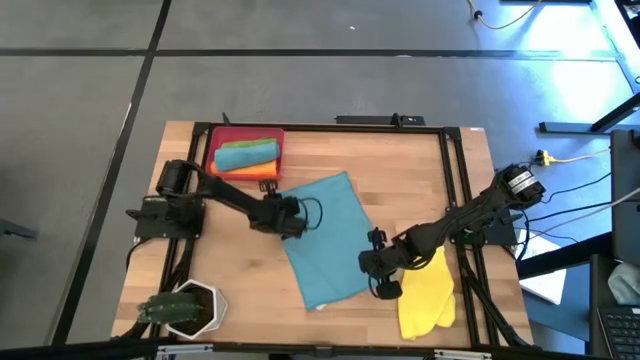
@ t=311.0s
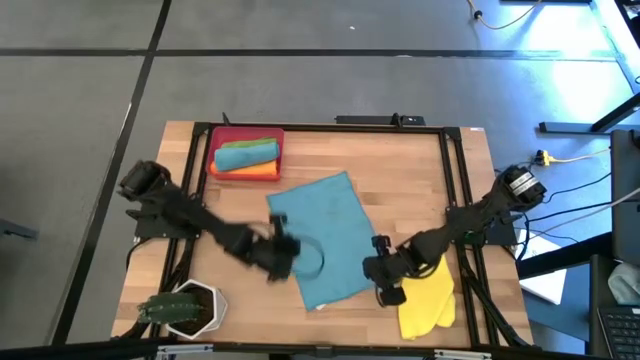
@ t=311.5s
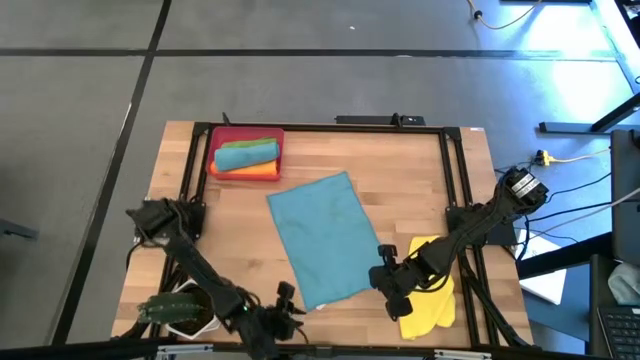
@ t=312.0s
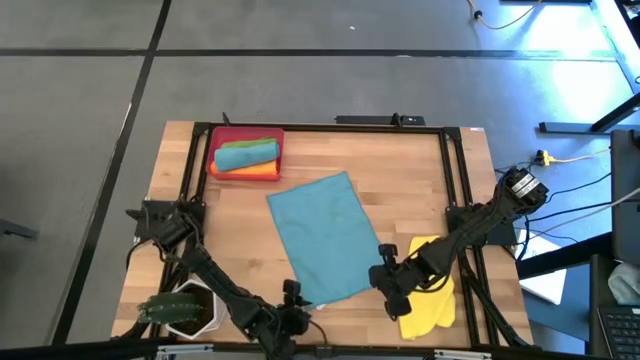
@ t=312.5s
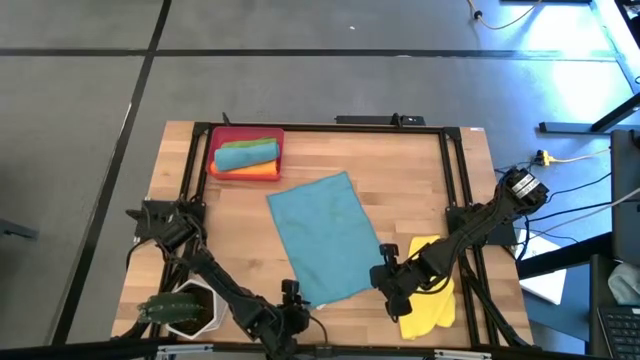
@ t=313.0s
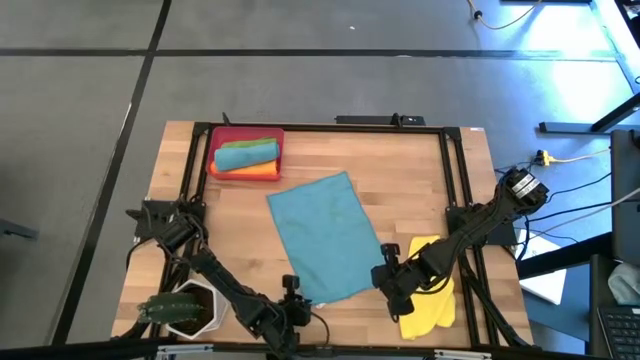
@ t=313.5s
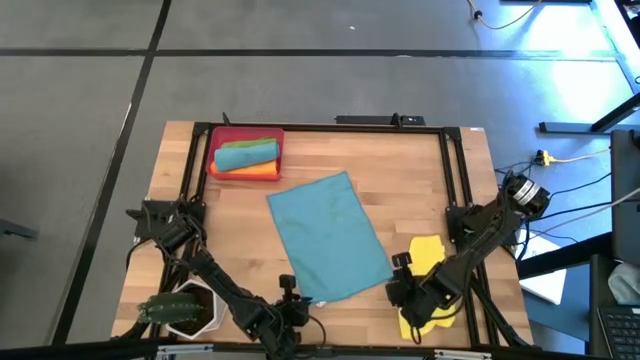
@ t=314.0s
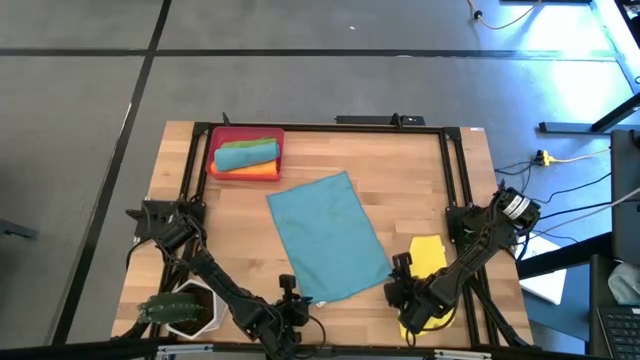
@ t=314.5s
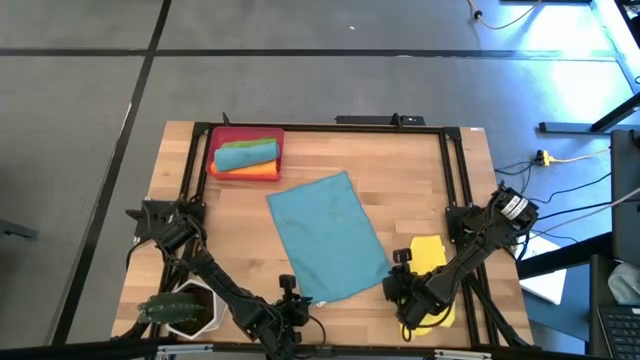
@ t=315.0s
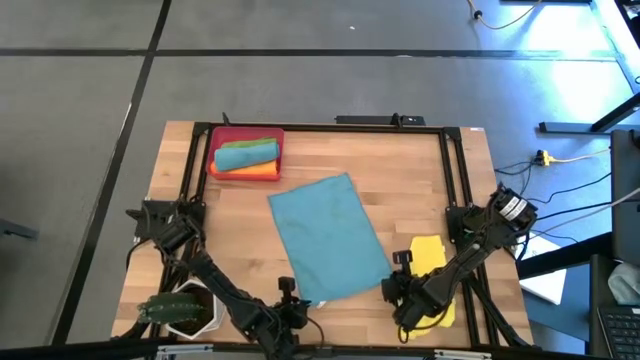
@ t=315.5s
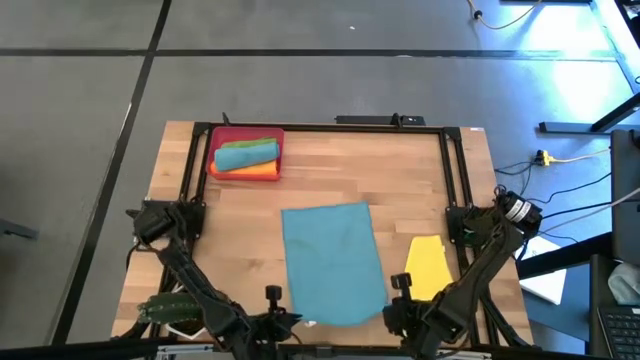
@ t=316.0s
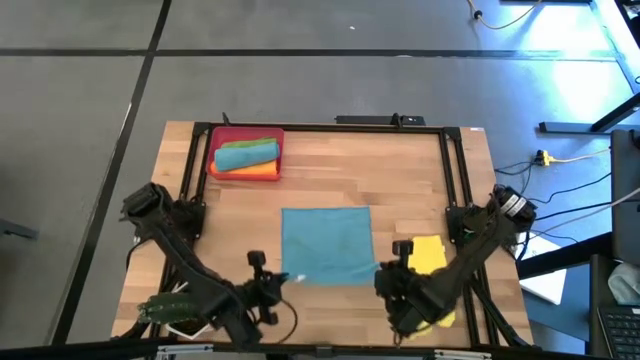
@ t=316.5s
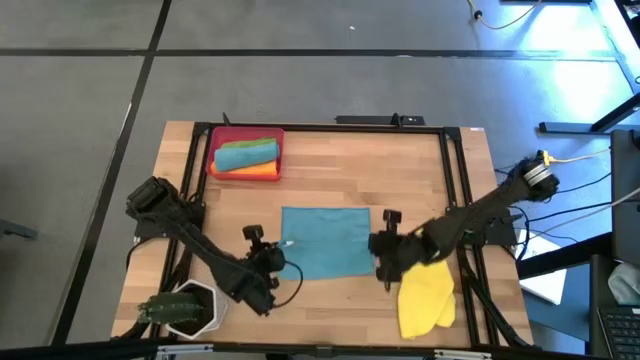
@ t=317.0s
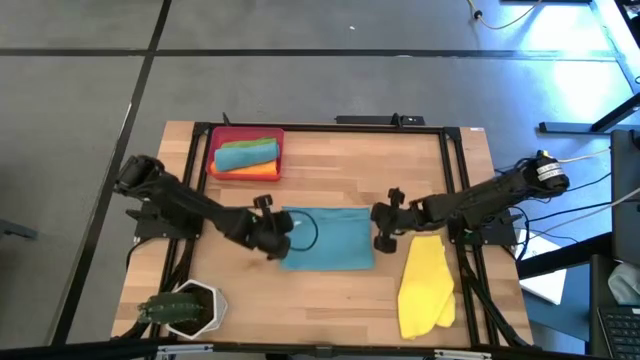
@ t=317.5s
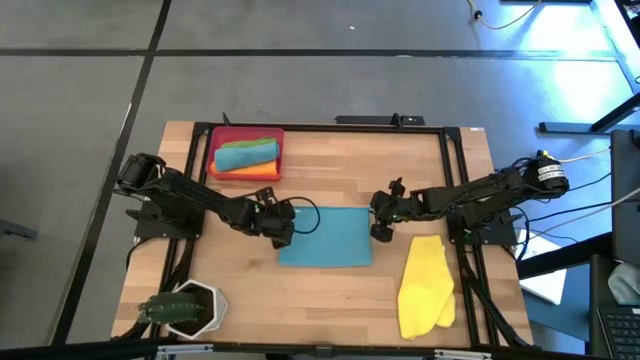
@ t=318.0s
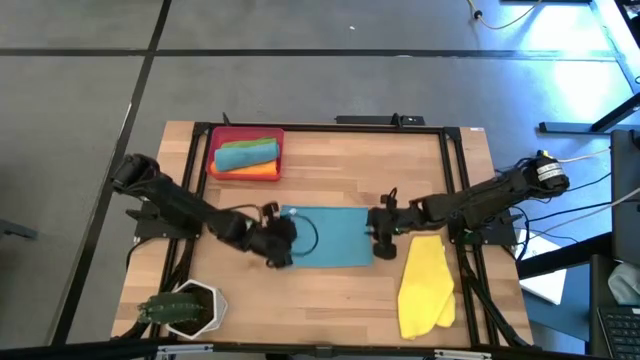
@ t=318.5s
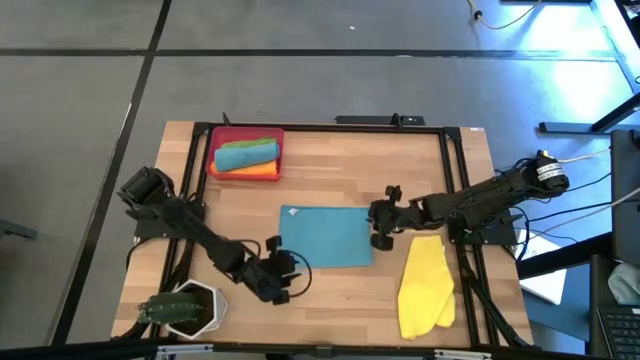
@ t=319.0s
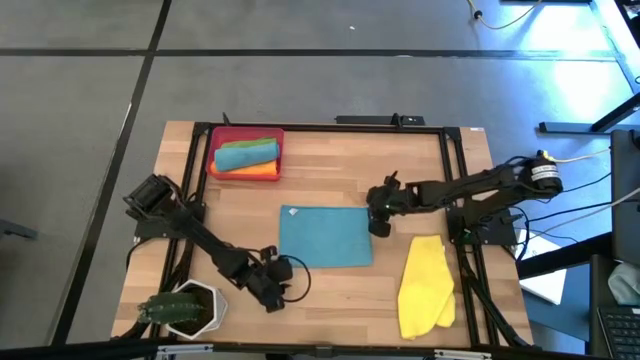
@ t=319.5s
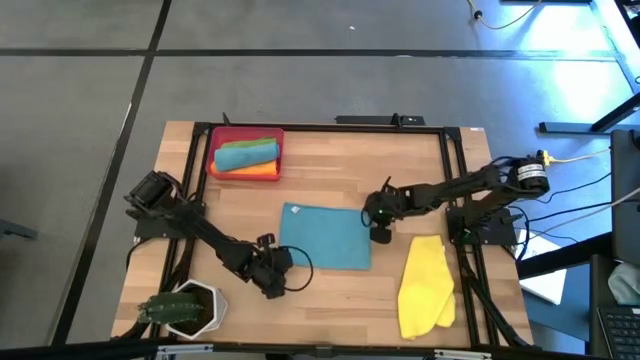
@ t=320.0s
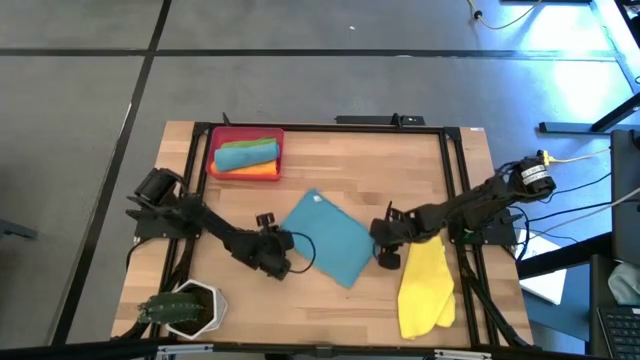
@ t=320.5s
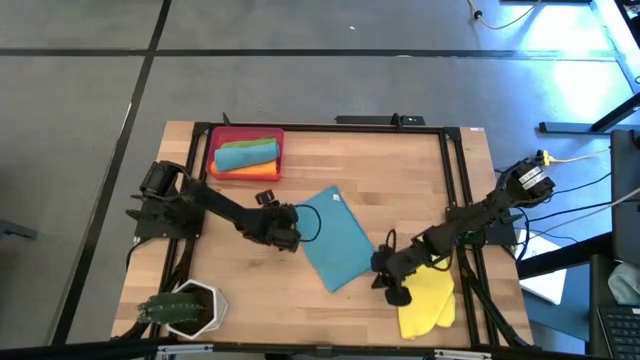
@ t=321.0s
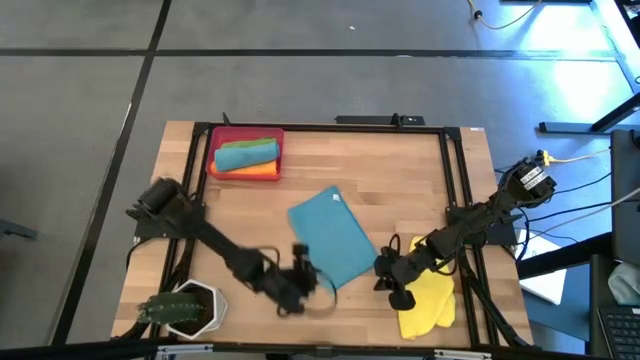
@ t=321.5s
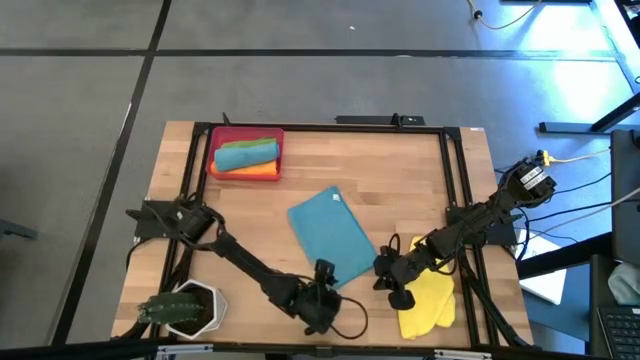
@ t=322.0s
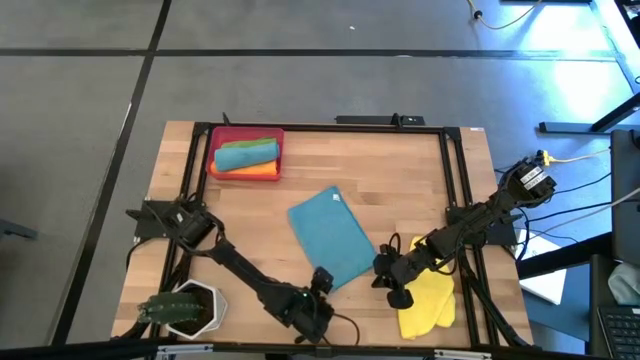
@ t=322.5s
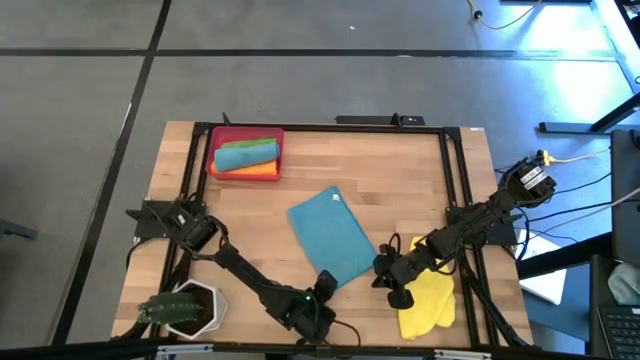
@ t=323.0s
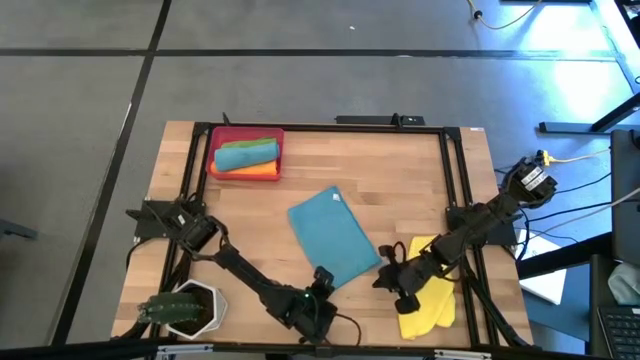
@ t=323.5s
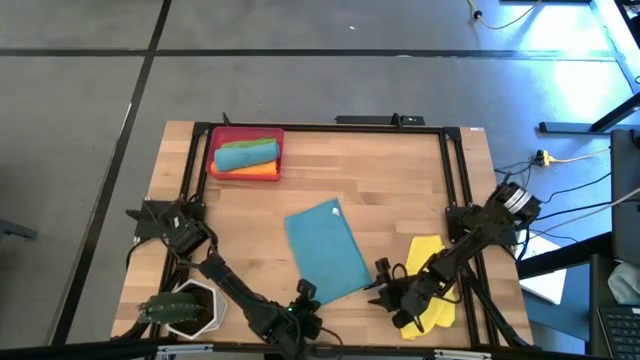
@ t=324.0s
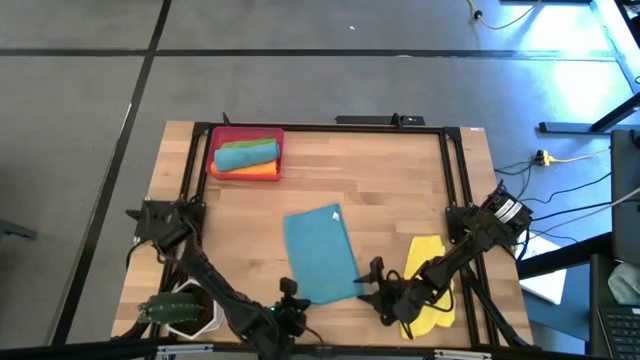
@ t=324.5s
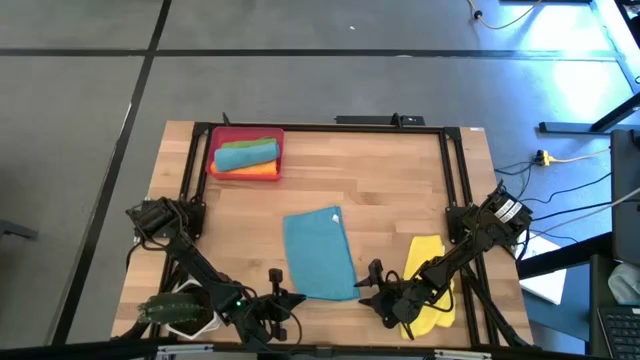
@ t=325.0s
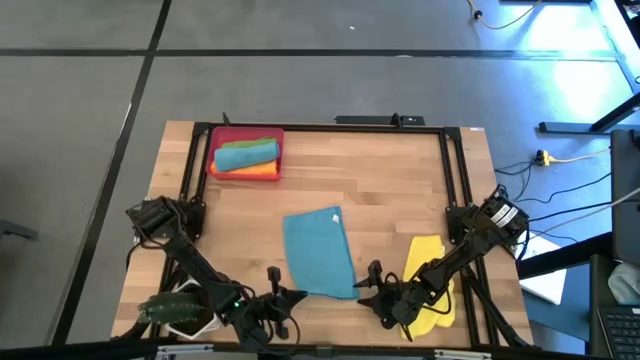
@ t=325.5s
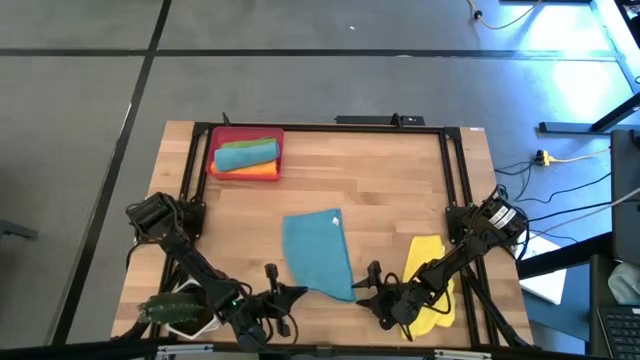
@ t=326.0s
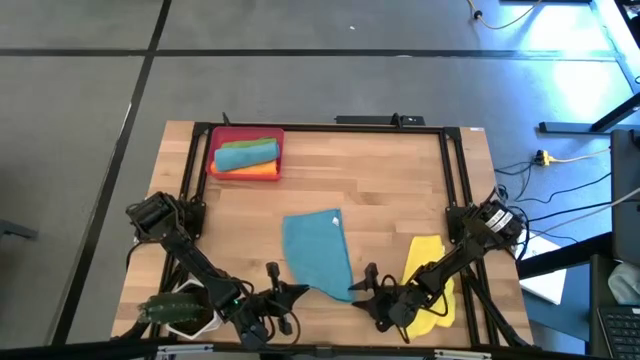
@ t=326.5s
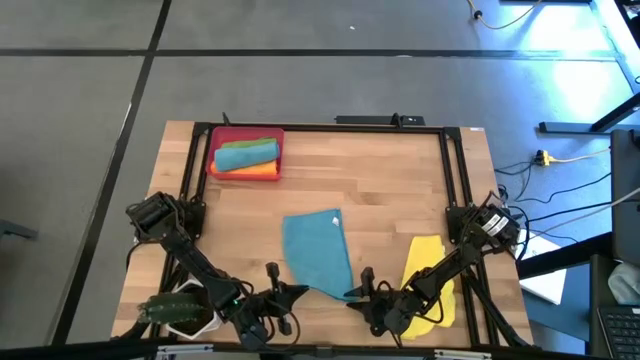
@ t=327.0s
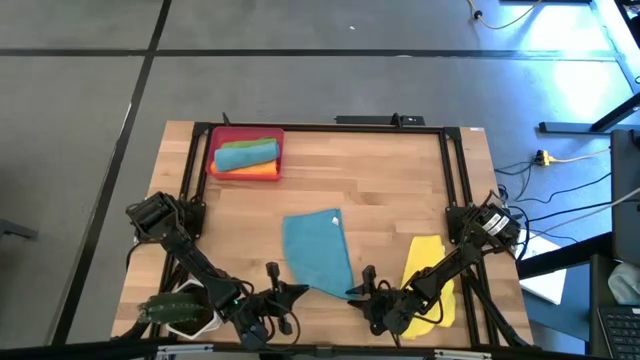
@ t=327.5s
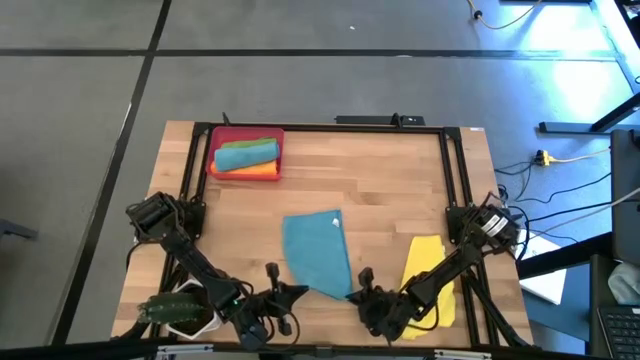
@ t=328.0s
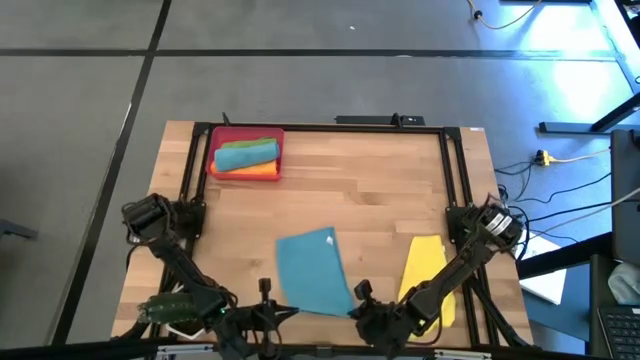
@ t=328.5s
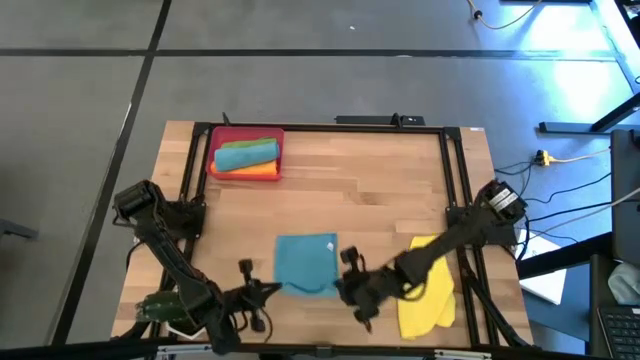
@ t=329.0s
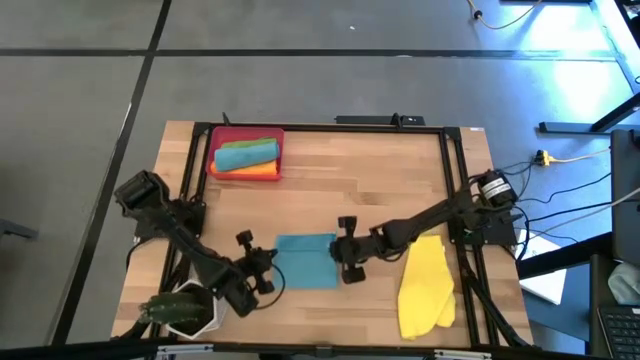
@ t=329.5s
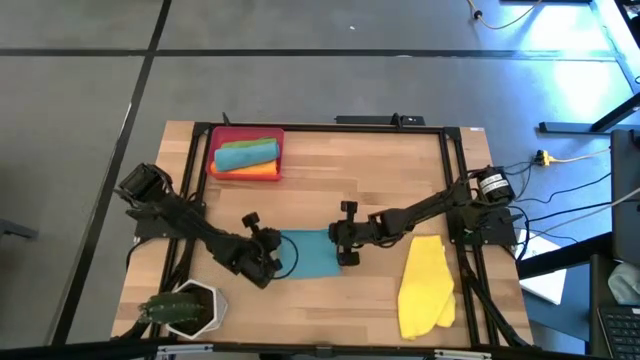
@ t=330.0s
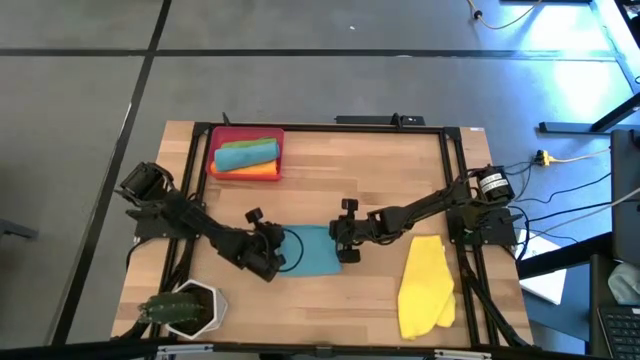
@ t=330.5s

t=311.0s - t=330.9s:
Task: Roll microfiber towels into tight, uniform cylinder then place into a basket
Fold the blue microfiber towel

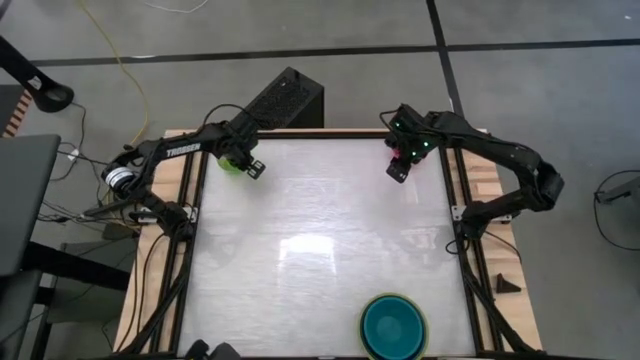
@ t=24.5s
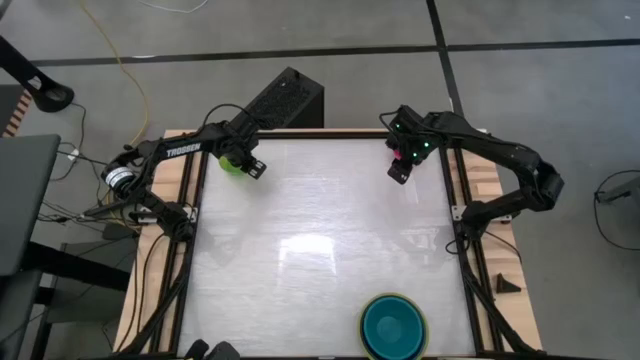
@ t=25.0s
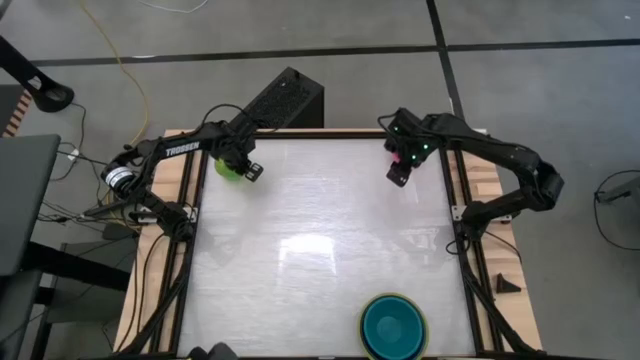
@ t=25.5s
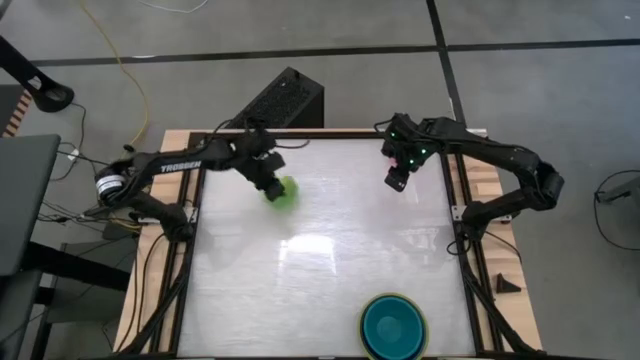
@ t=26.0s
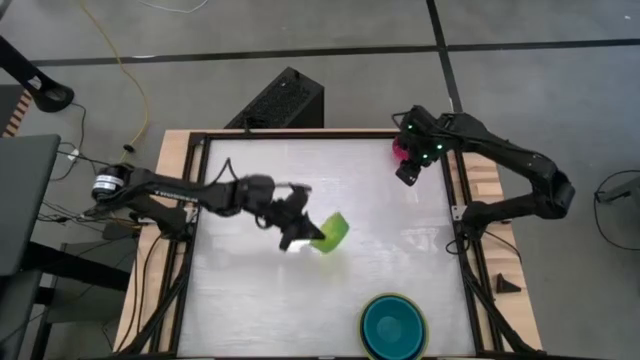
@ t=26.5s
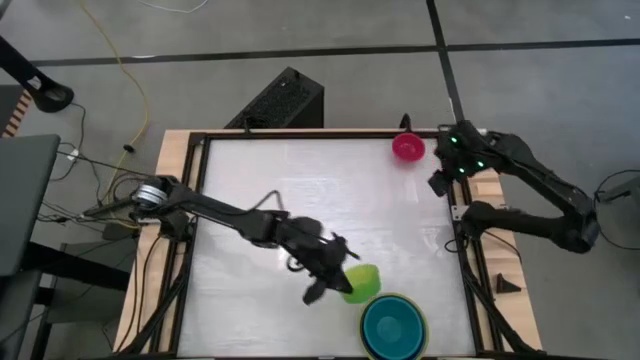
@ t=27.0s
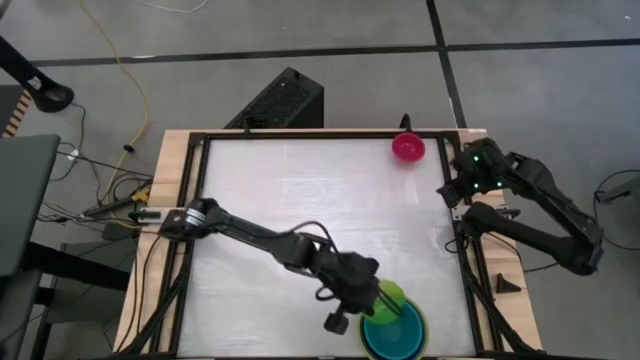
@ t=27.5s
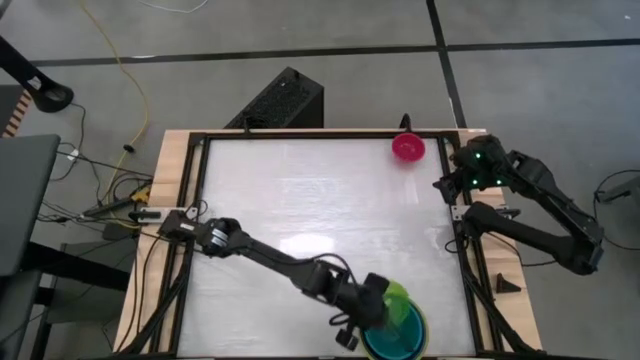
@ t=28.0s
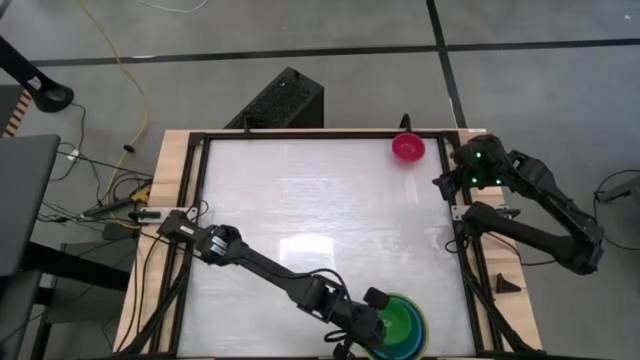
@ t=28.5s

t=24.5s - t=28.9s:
Task: Nest bowls inside each other by size order
Stack the light green bowl into the dark blue bowl
